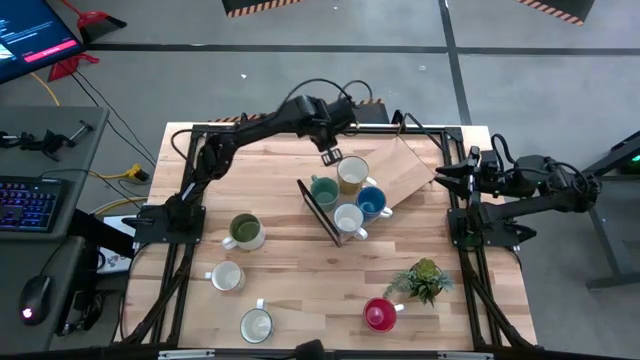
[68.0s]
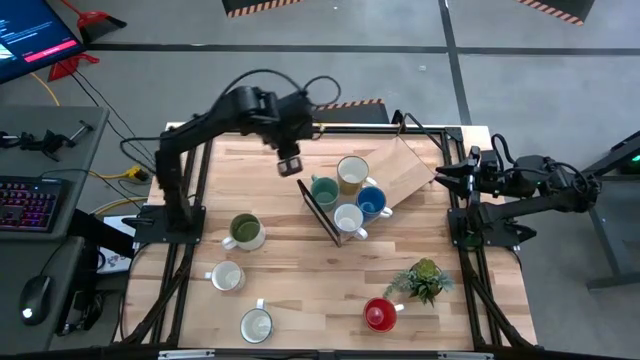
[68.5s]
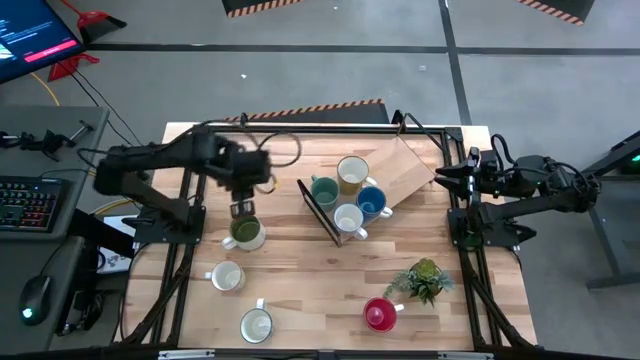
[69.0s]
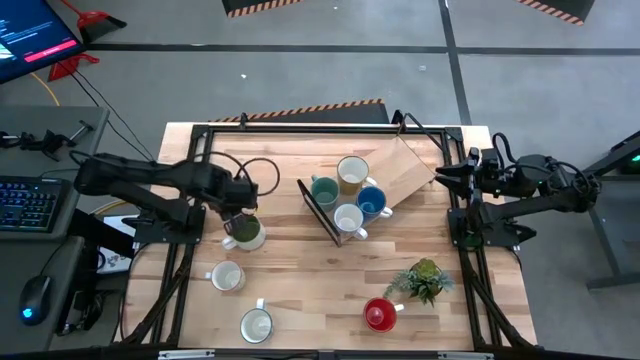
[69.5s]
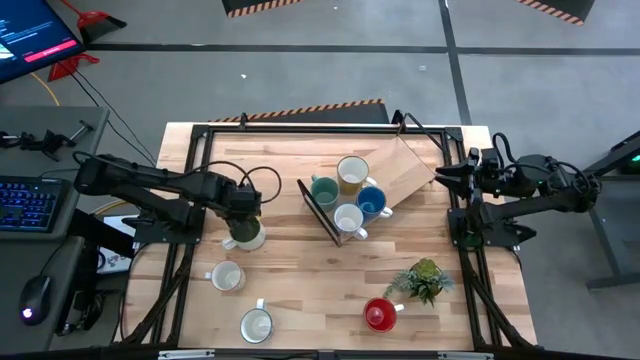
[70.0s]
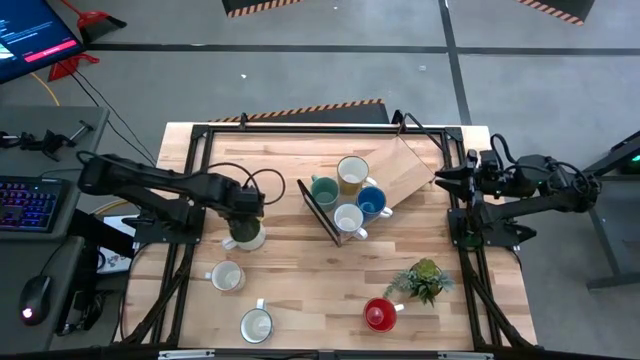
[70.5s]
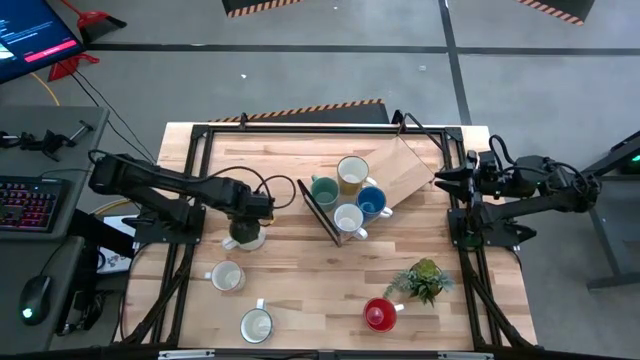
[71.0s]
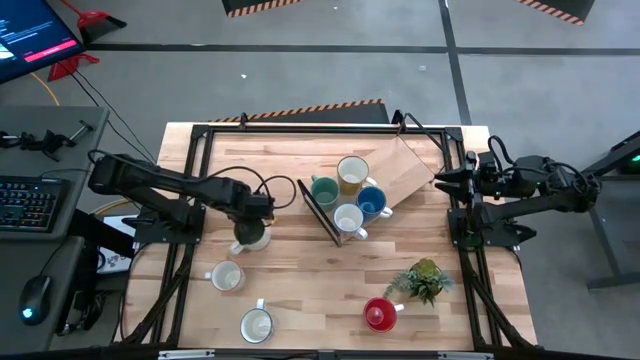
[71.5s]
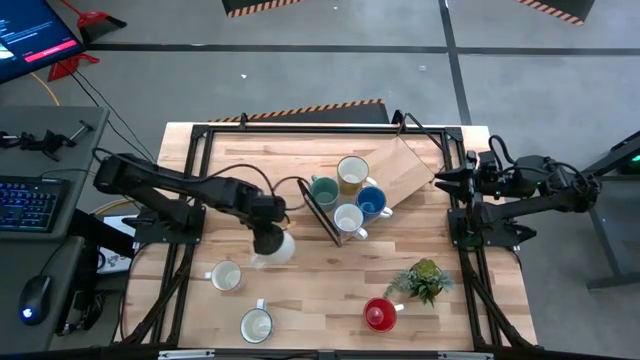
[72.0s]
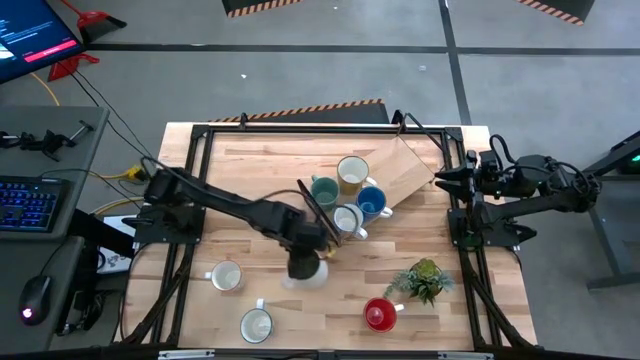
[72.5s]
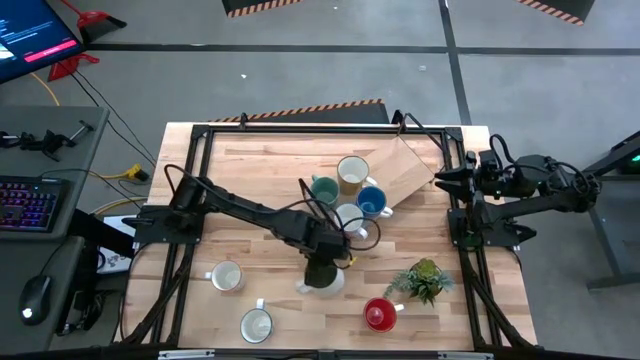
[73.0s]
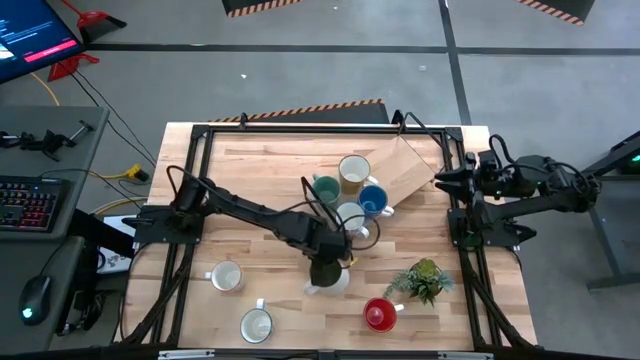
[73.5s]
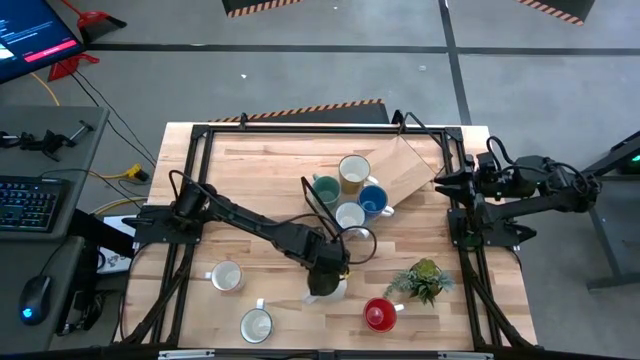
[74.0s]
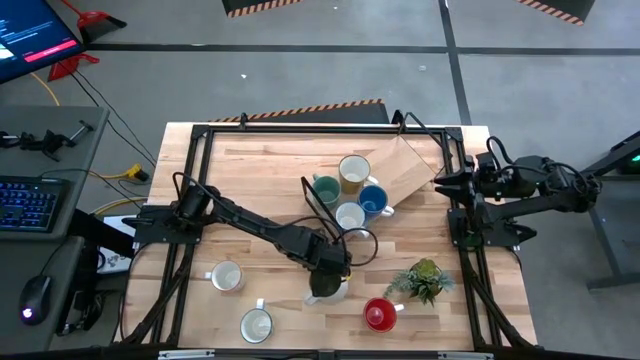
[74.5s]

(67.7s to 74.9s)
Task: Place coffee mugs
Move the white mug to the bottom center of the table

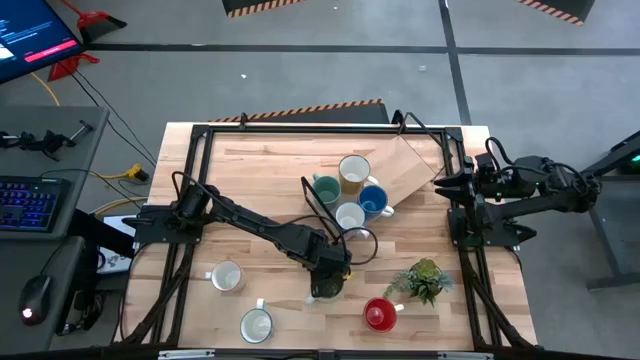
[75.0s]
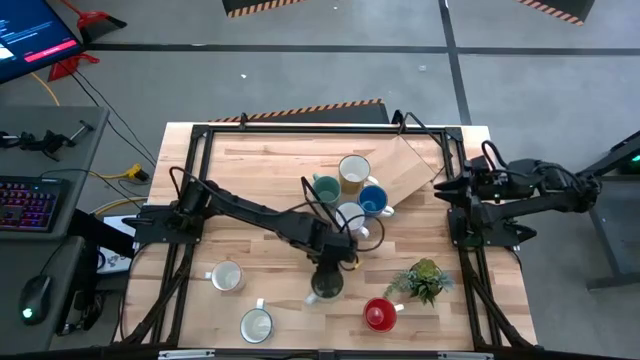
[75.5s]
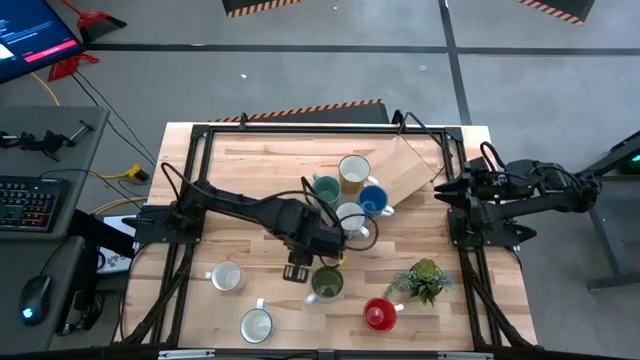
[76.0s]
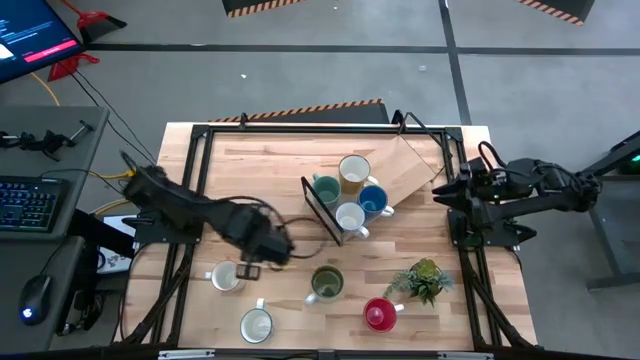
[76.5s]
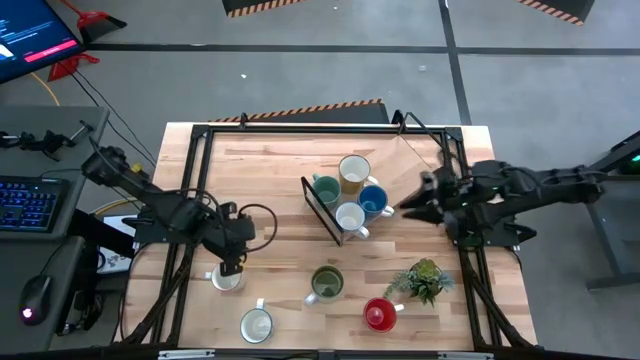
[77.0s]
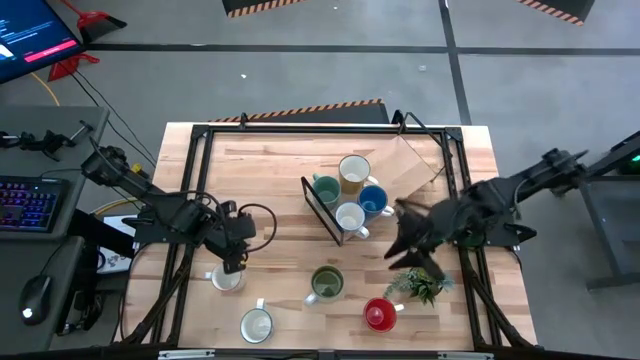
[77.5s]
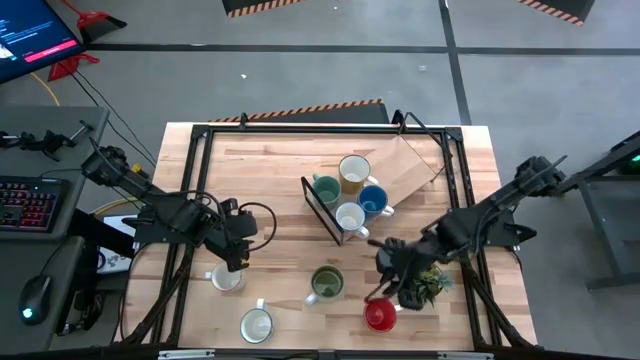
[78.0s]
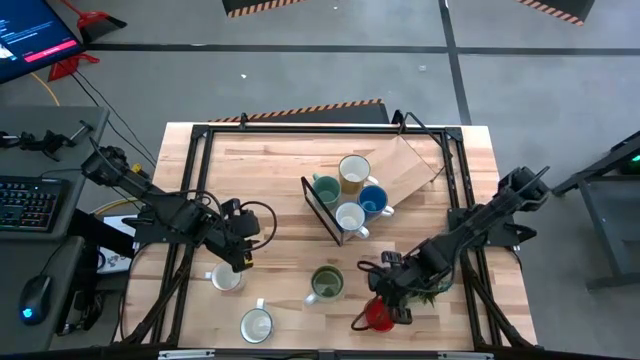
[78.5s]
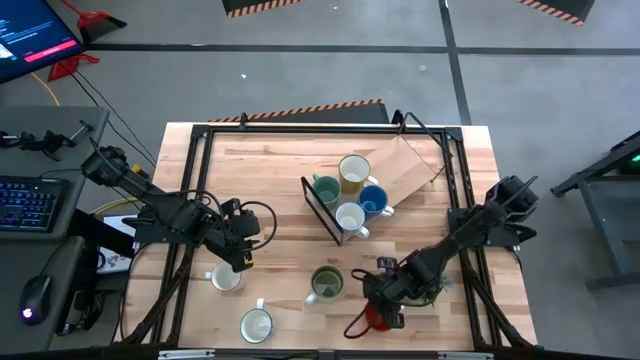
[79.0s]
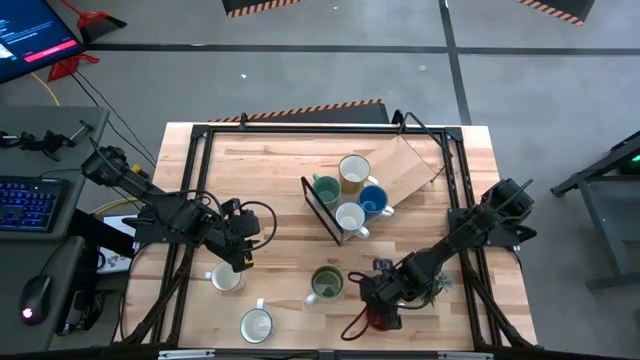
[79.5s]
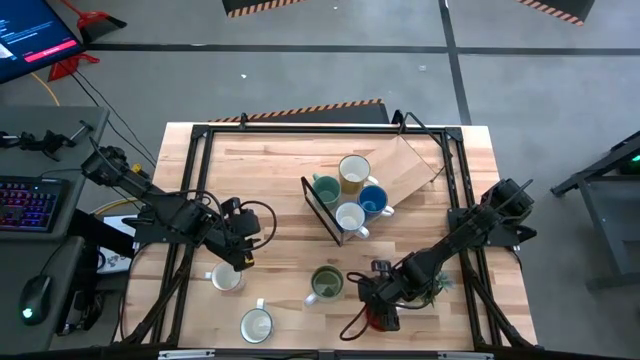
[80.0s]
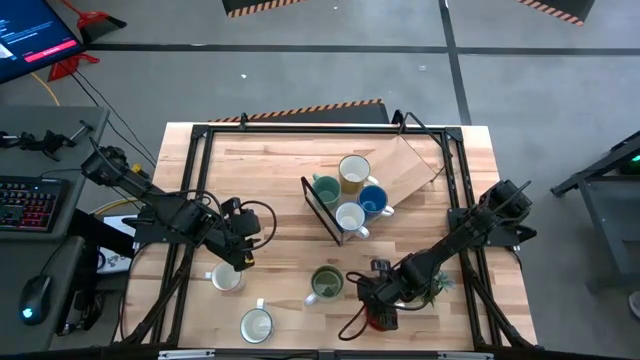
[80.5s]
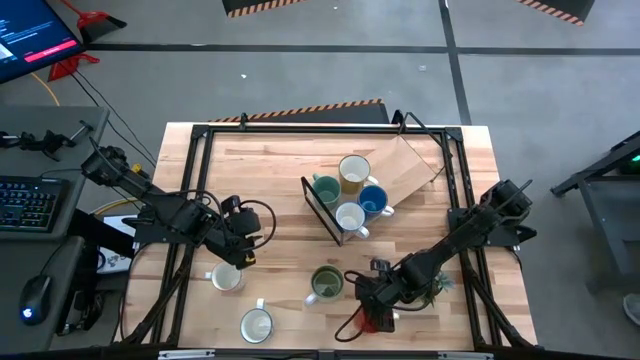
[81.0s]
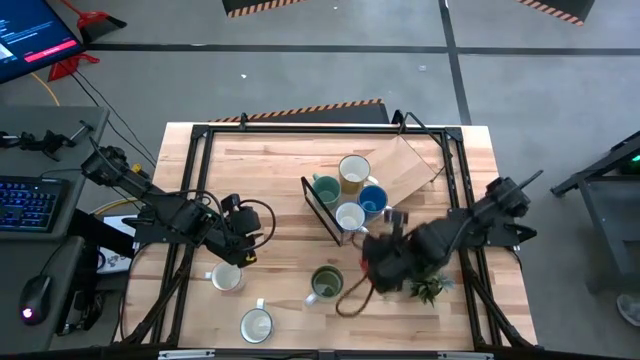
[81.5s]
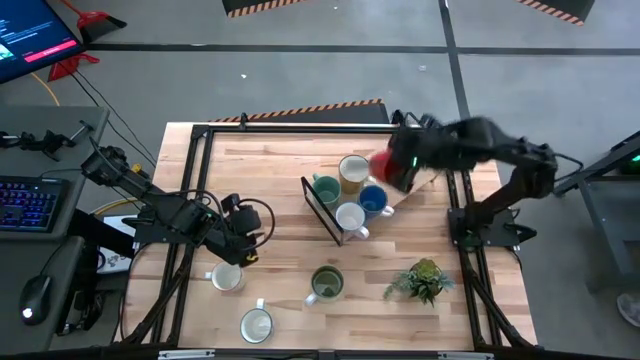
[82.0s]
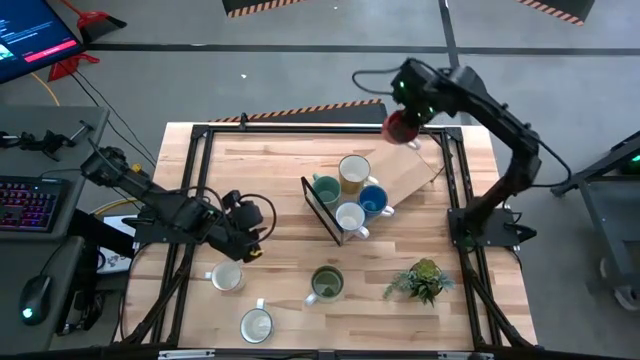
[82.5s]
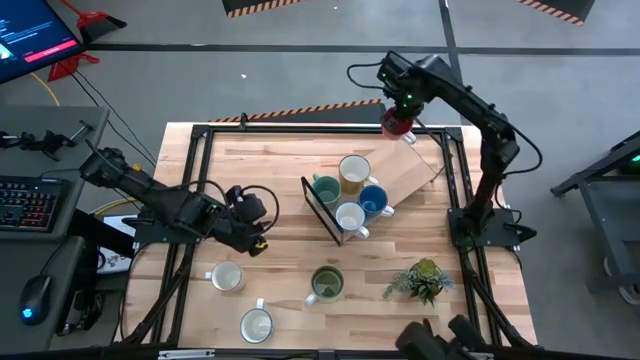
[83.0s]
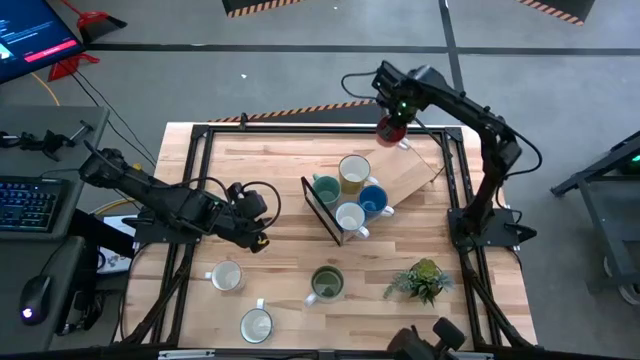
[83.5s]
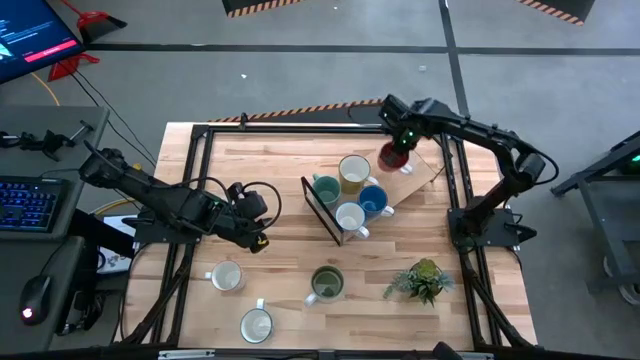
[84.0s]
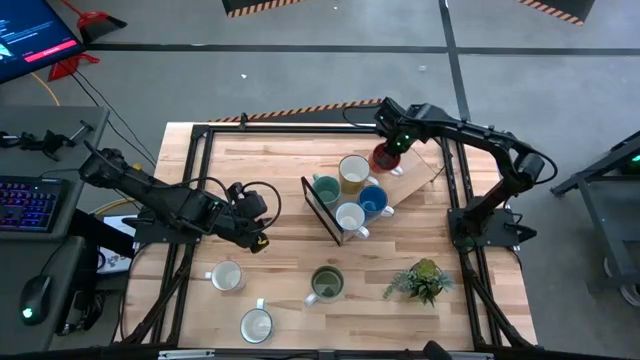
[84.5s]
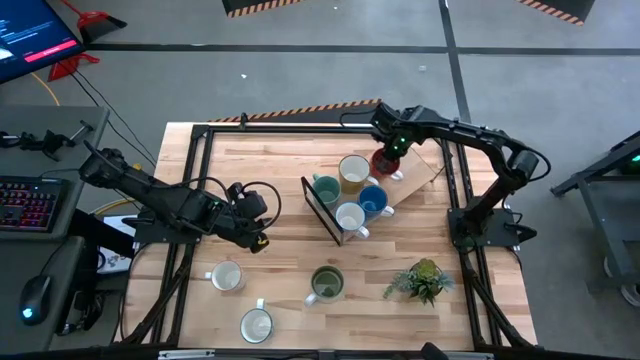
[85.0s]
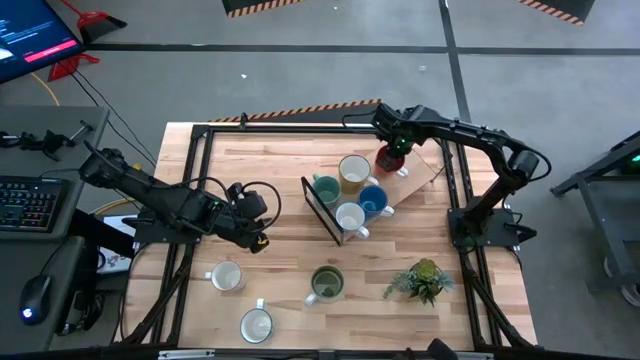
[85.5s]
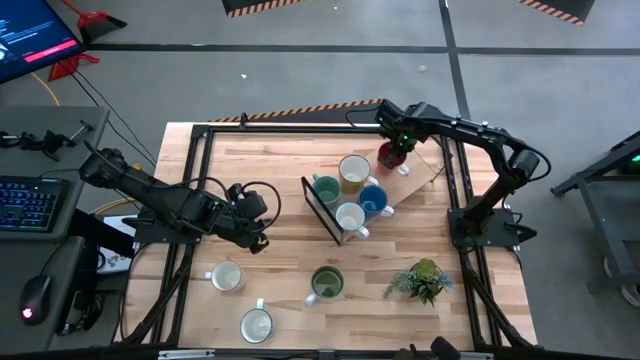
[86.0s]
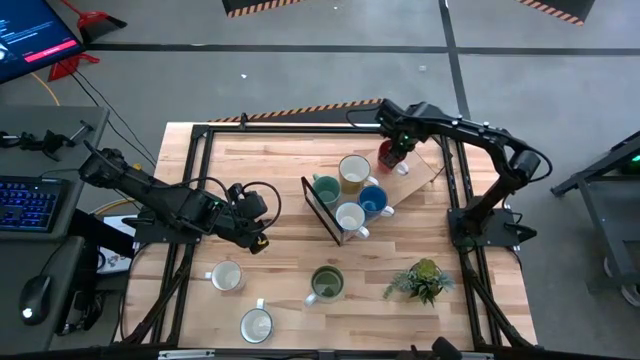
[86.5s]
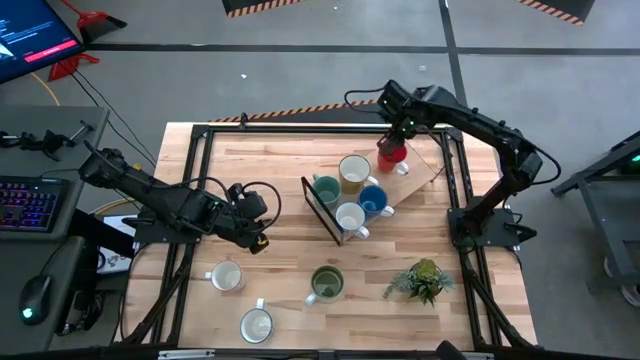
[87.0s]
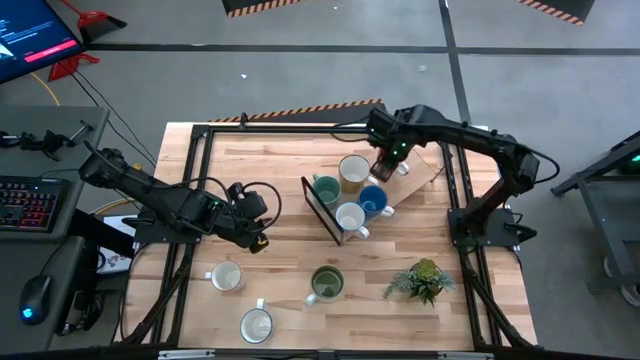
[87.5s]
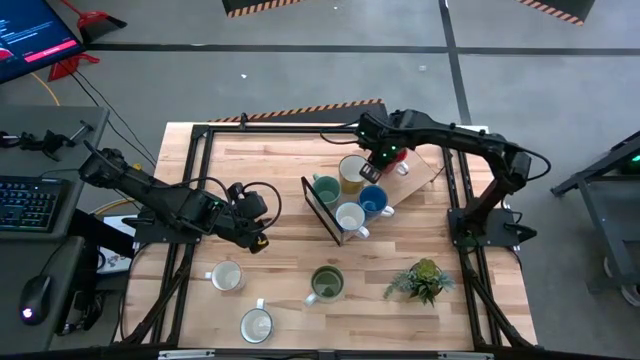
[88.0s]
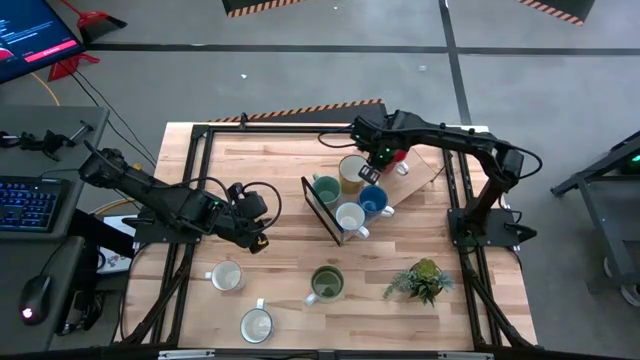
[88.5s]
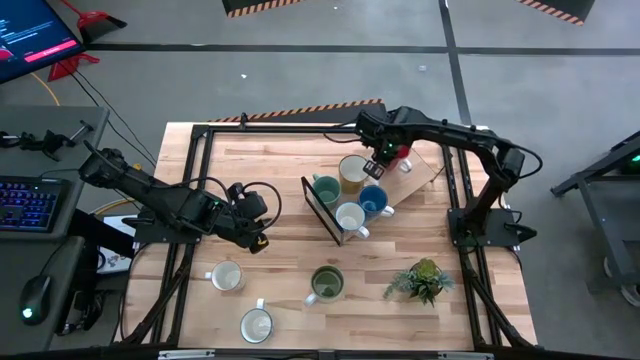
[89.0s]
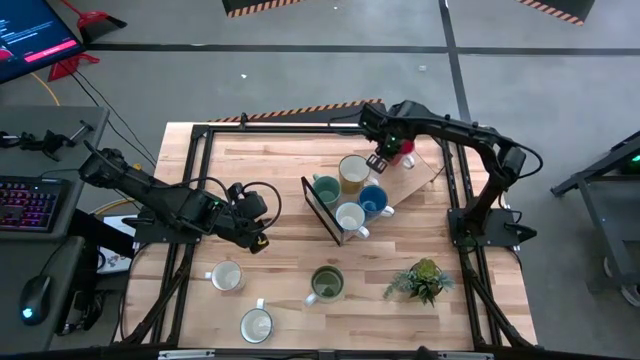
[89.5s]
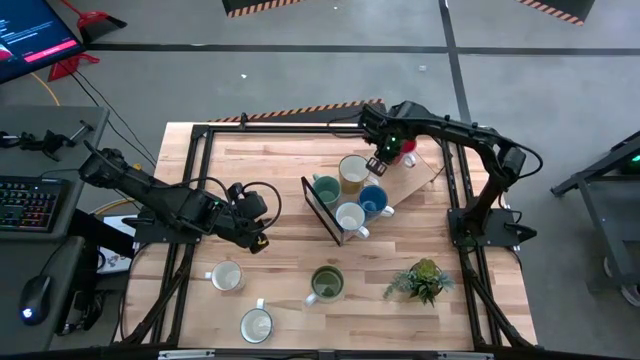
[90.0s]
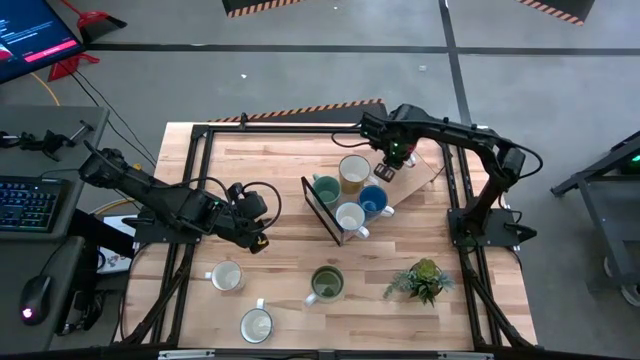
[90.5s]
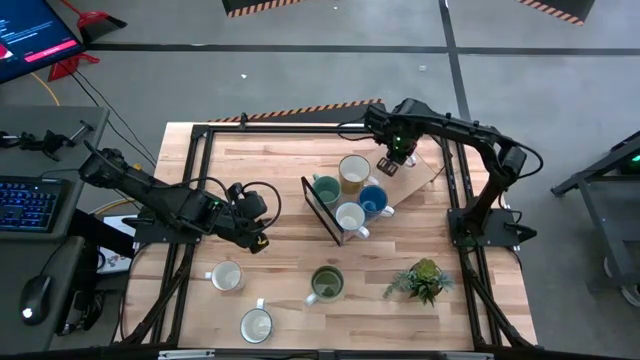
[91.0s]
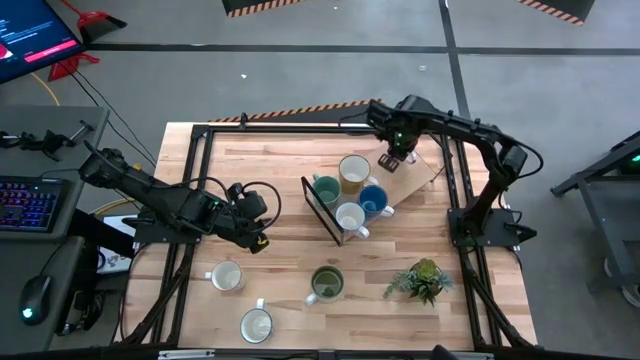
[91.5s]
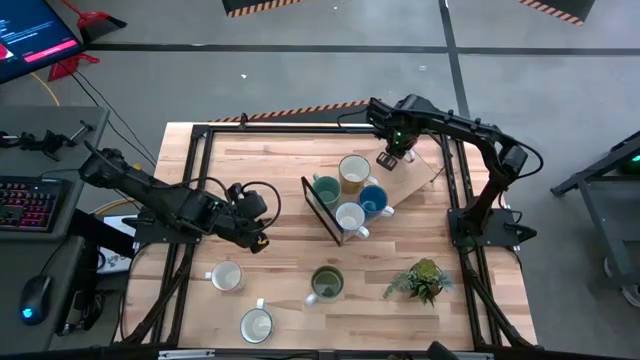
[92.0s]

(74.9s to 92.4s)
Put the red mug on the shelf
